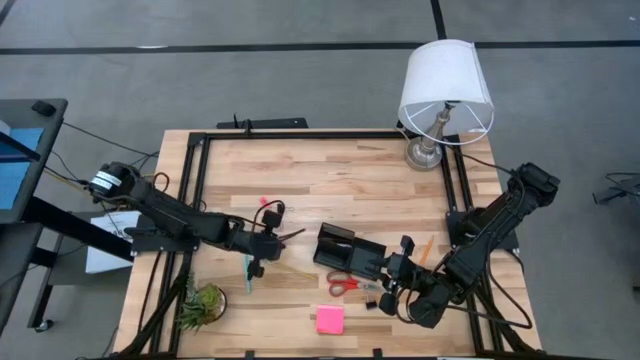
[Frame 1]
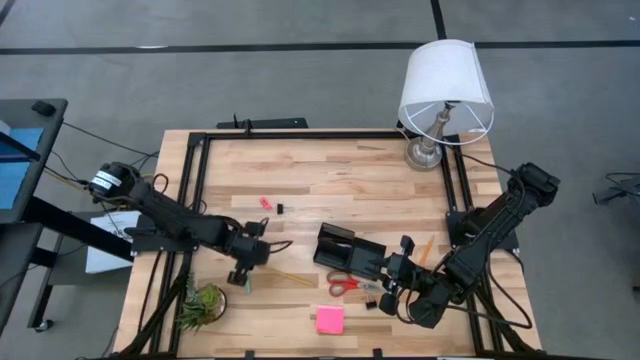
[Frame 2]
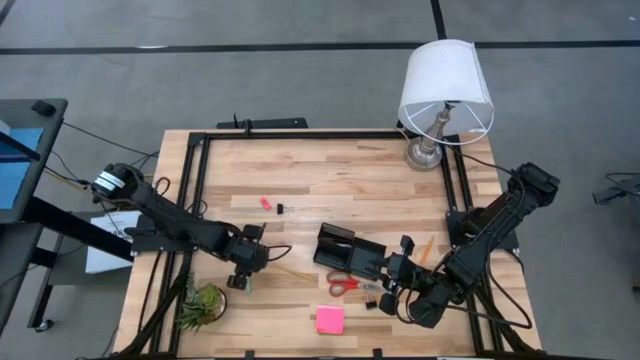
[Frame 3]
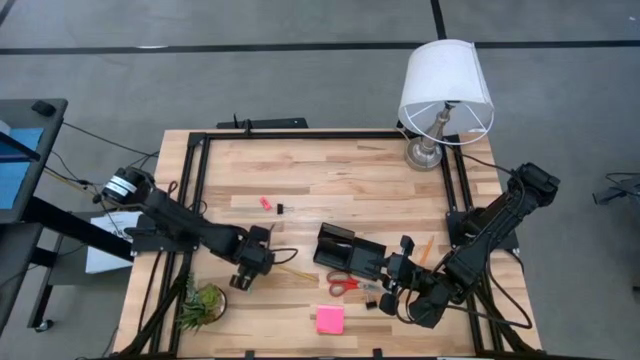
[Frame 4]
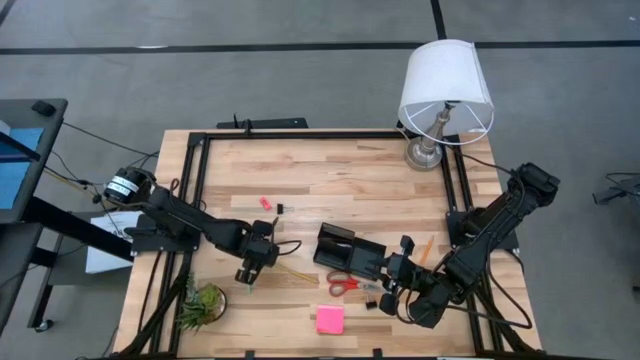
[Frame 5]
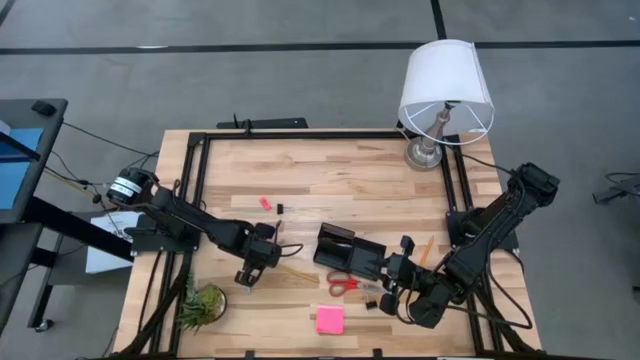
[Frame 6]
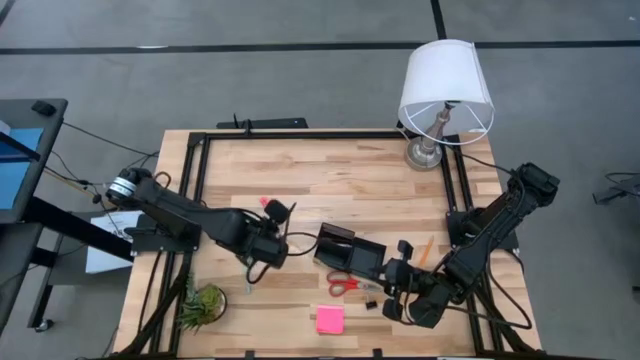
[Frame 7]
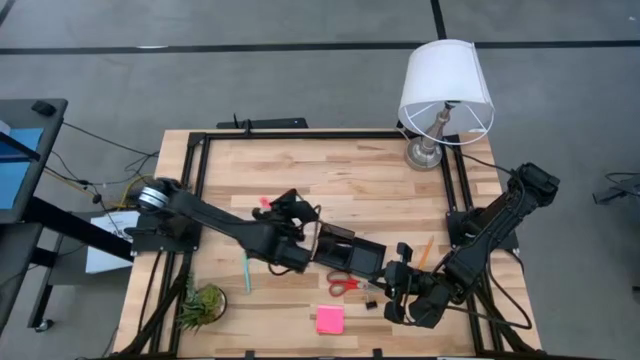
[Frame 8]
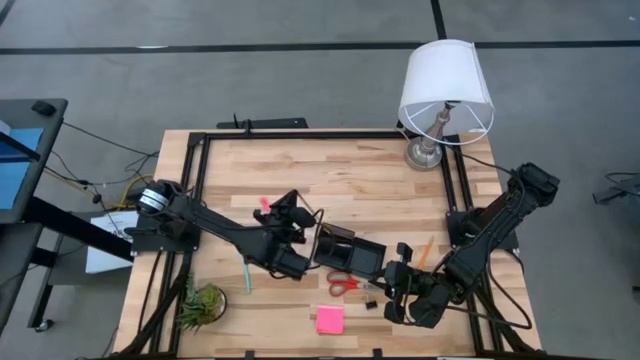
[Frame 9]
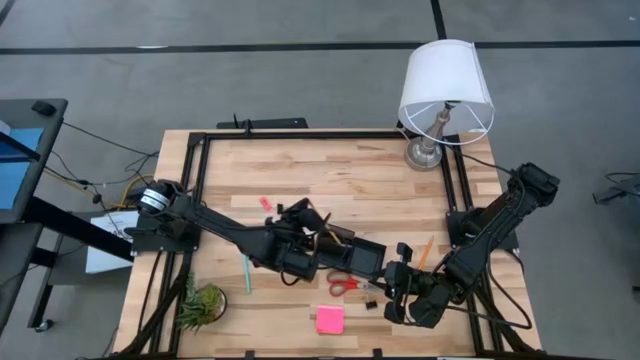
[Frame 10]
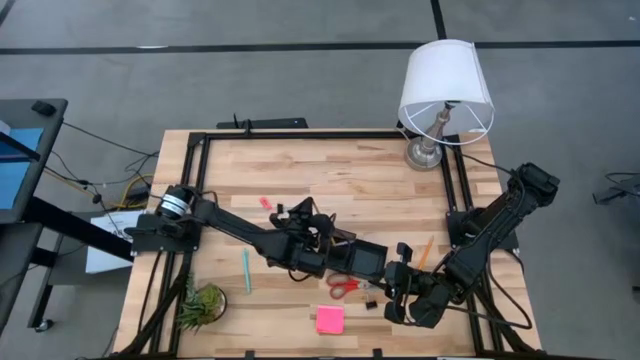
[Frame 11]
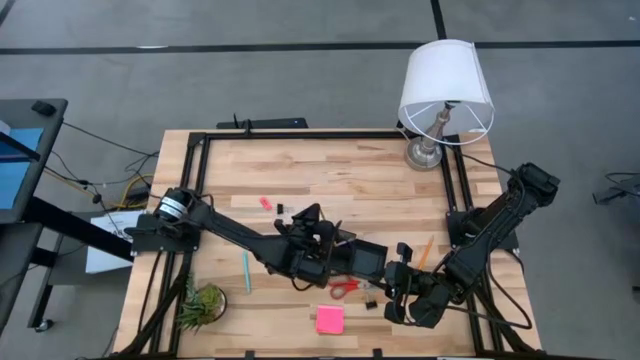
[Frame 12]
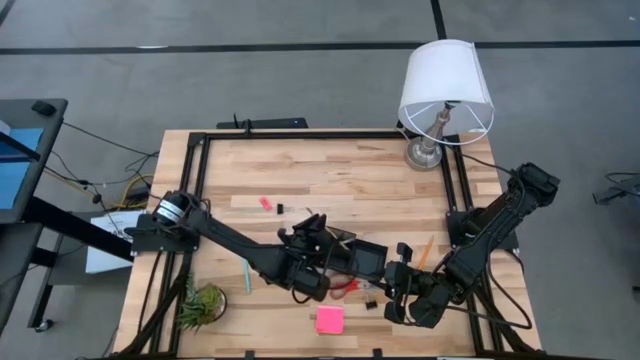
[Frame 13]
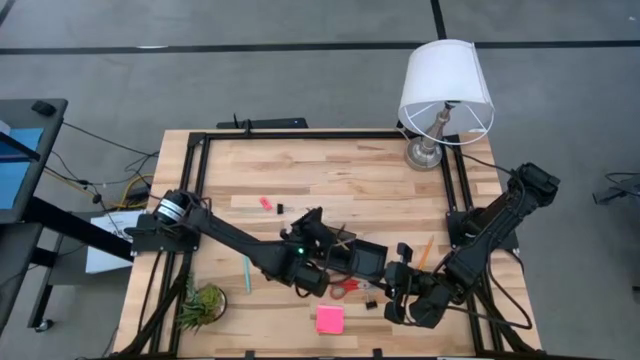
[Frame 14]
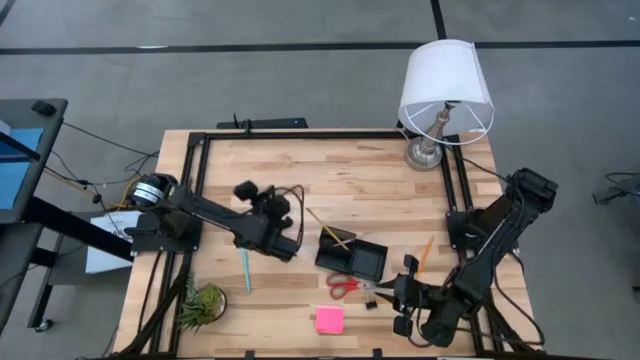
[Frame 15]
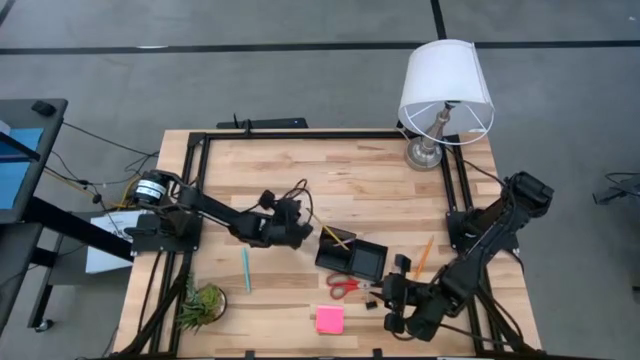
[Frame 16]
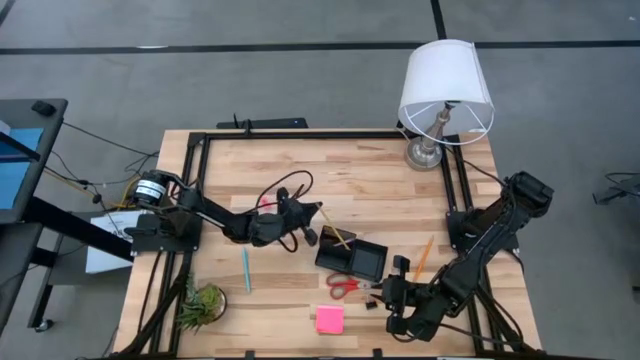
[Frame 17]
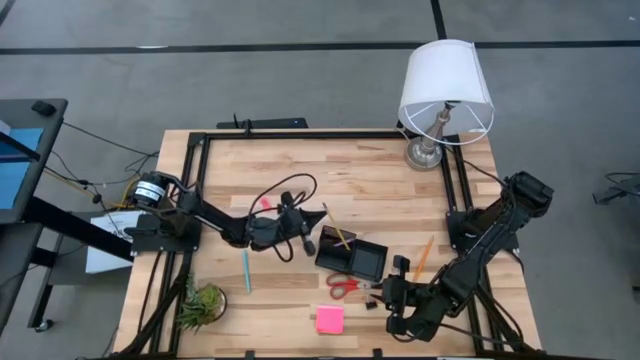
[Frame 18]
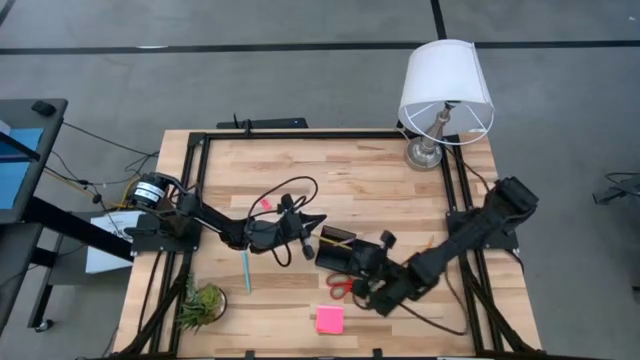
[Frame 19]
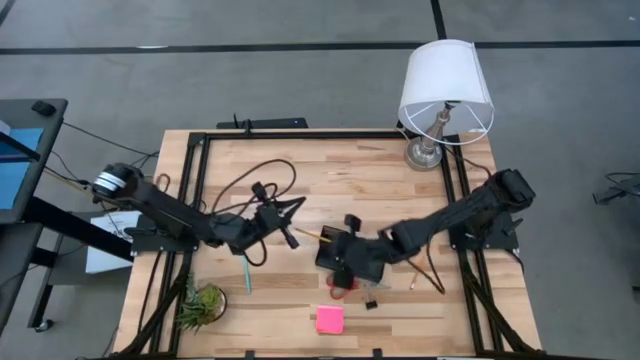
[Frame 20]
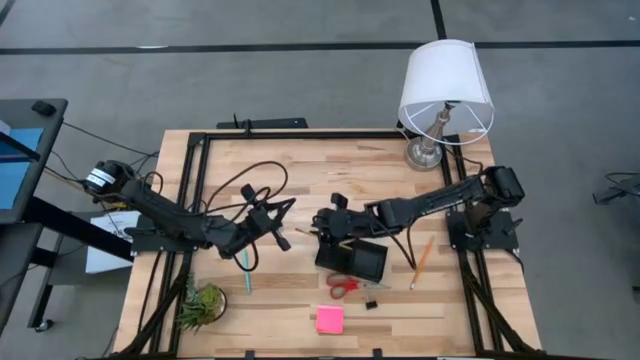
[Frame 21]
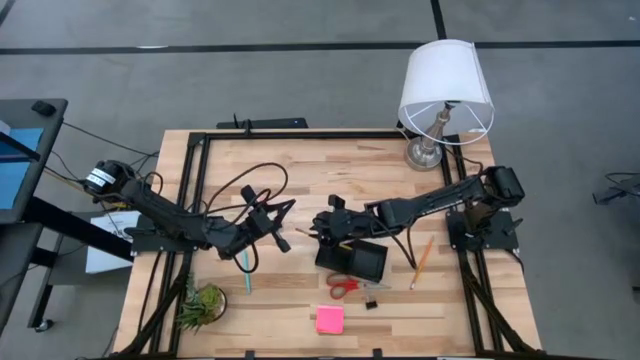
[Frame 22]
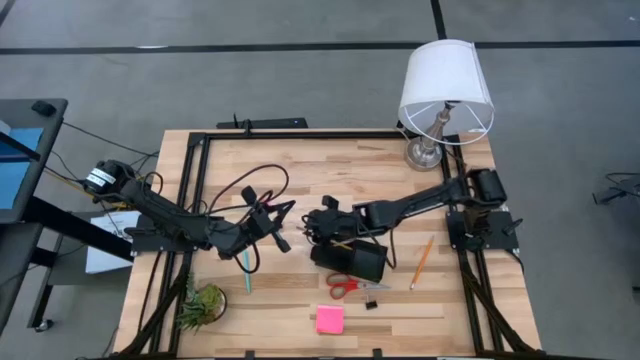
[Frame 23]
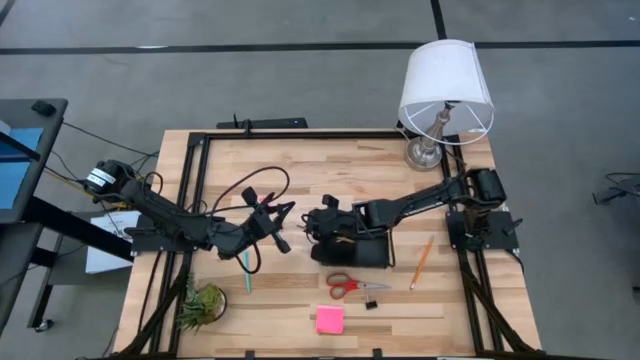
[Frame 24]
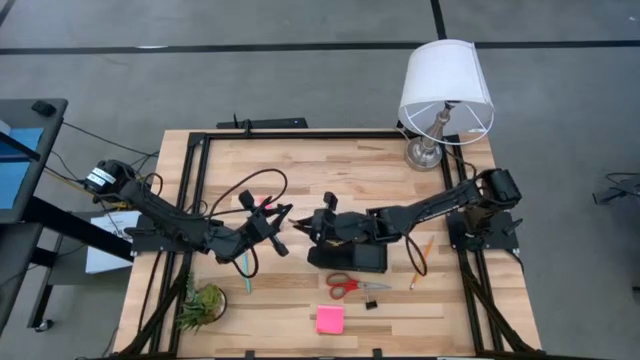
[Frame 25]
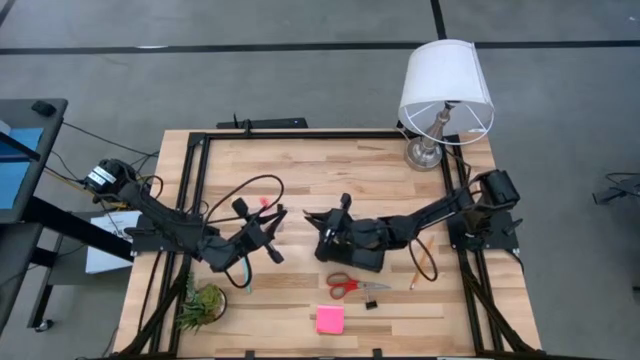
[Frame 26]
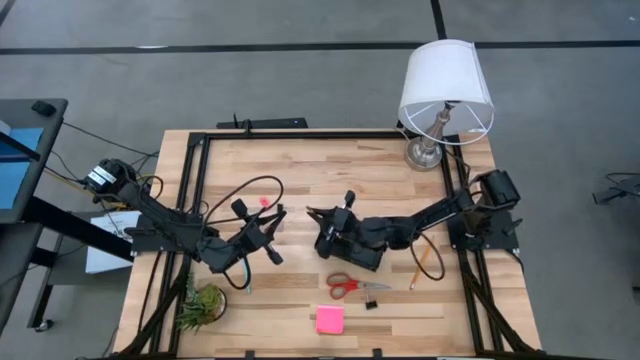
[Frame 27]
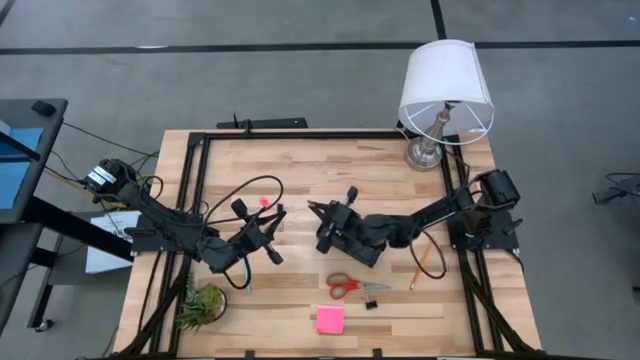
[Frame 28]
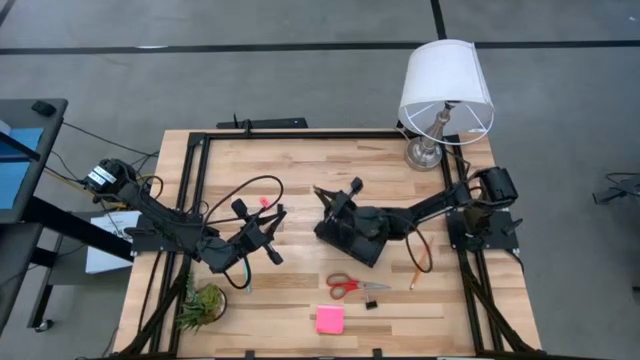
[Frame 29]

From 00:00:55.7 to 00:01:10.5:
Task: Pick and place office supplies into organizer
Put the left yellow pencil into the desk organizer

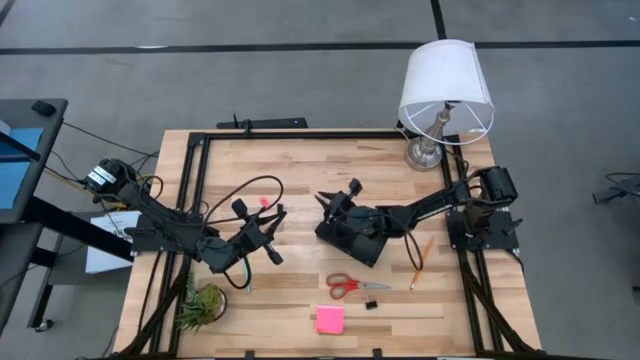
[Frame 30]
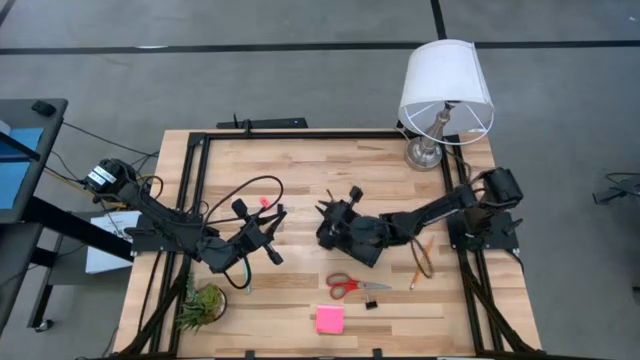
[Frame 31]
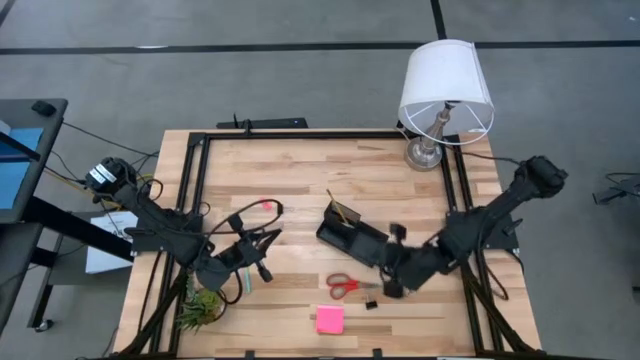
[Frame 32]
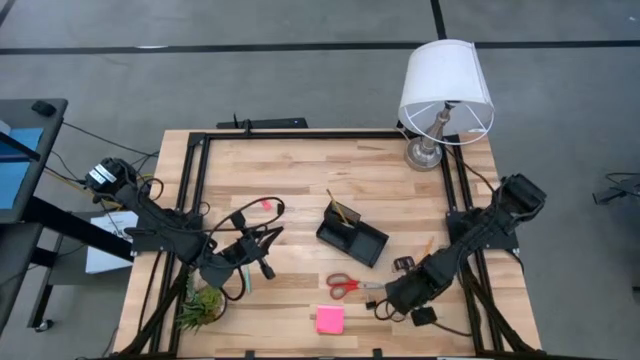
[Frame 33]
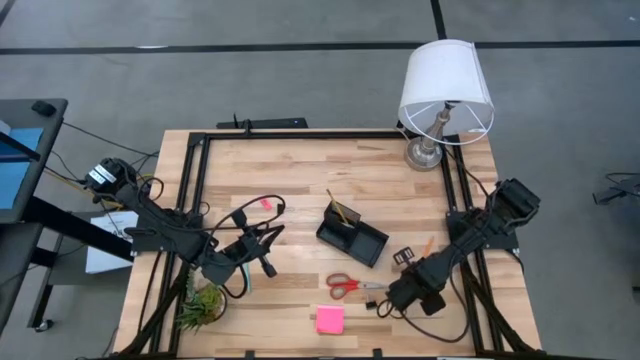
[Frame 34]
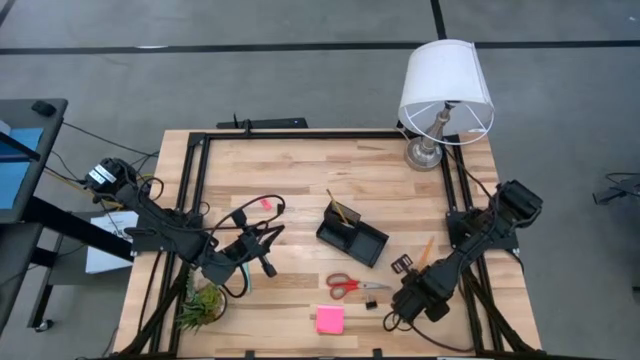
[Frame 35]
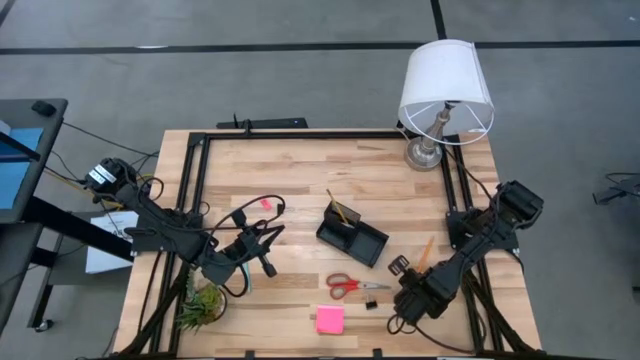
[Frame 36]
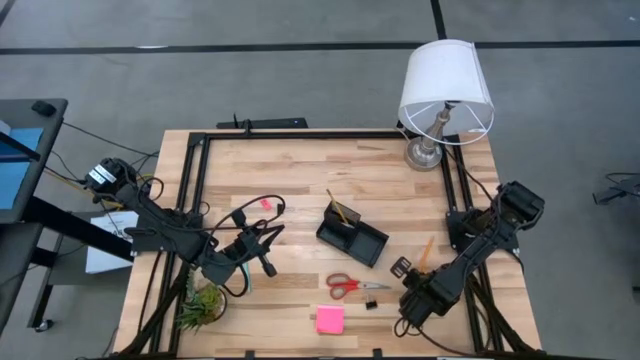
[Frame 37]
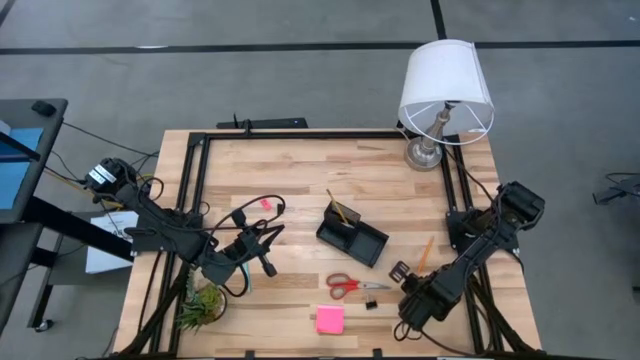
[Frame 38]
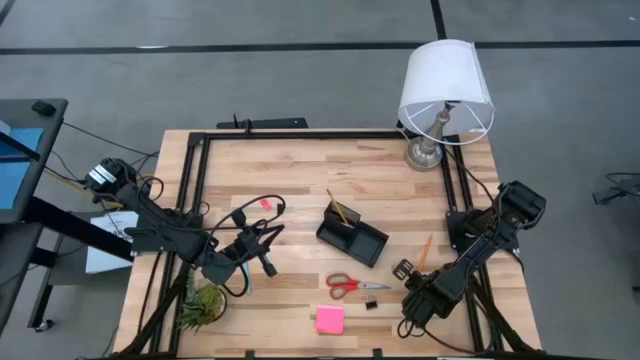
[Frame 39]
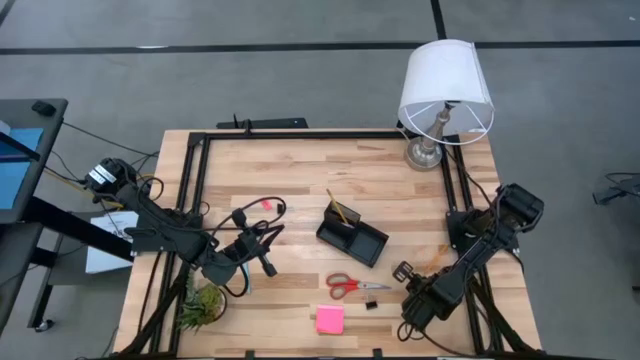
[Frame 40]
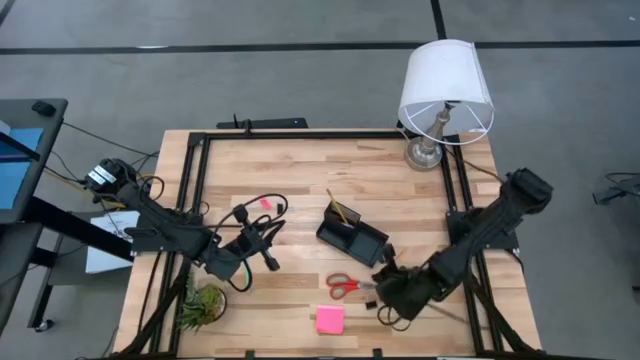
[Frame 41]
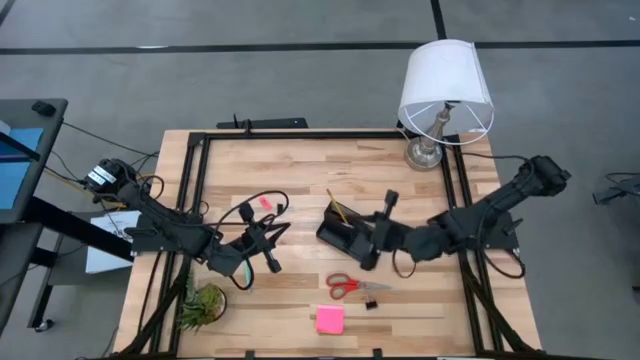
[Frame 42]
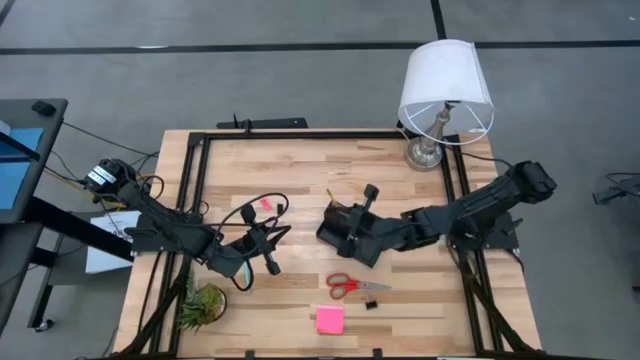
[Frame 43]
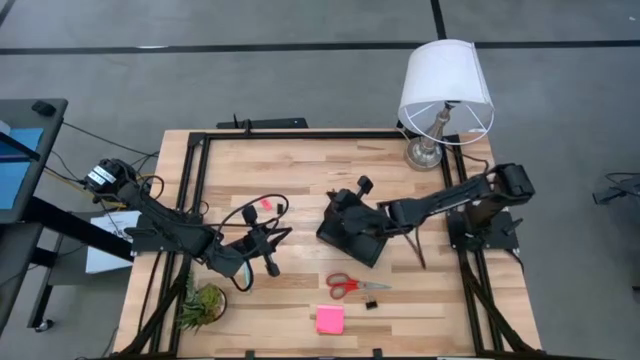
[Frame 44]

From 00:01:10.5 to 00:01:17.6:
Put the yellow pencil into the desk organizer
